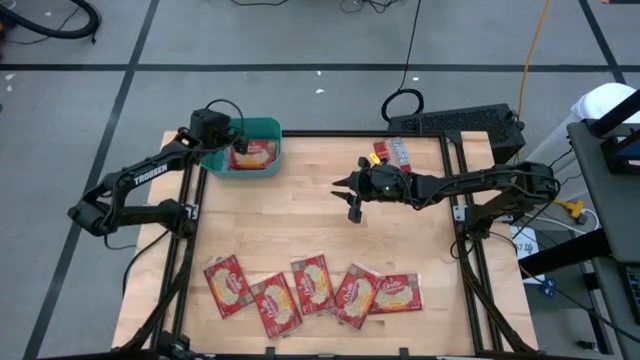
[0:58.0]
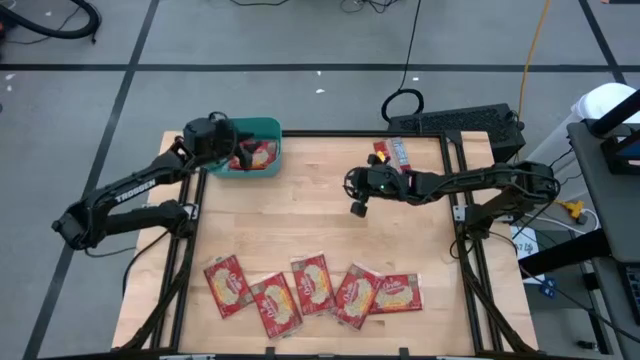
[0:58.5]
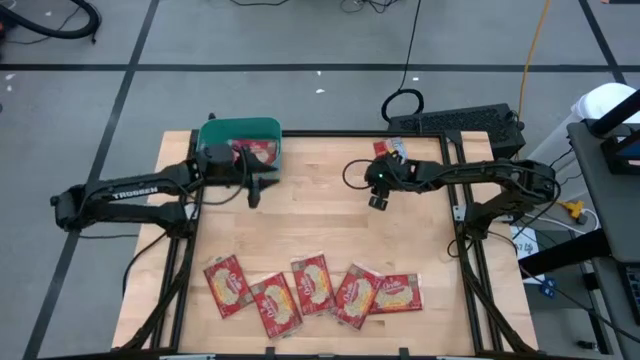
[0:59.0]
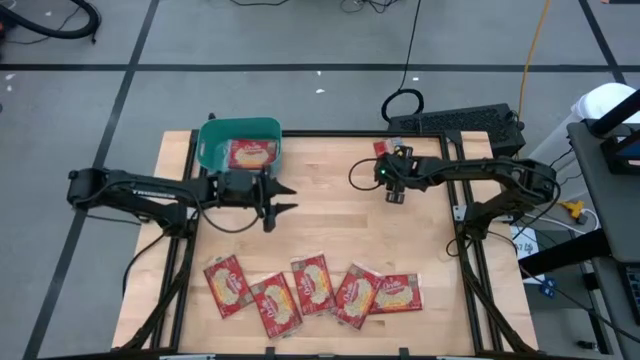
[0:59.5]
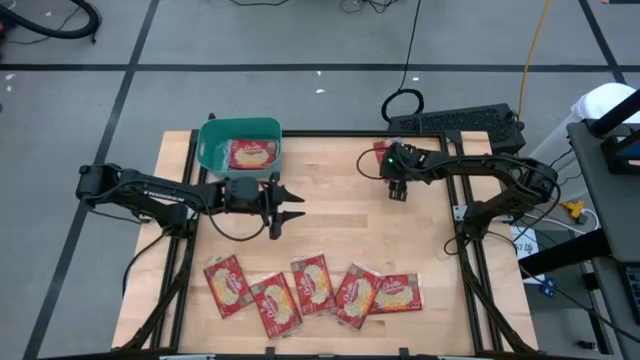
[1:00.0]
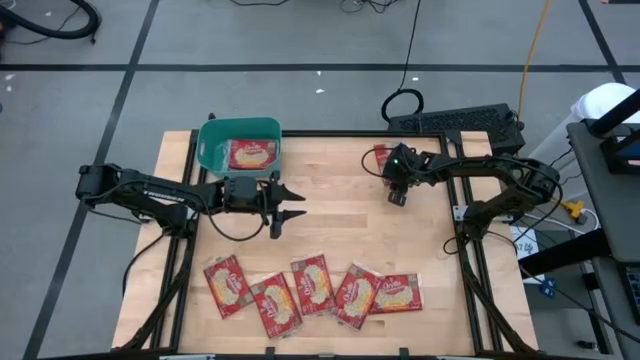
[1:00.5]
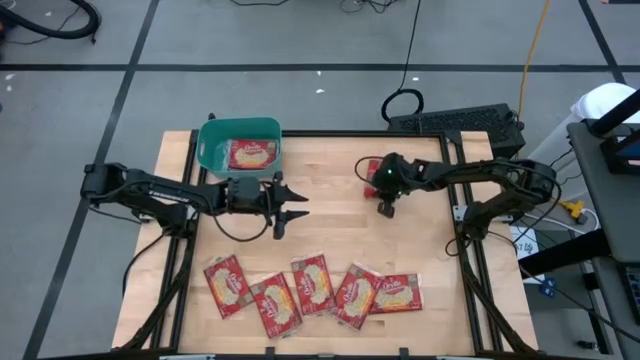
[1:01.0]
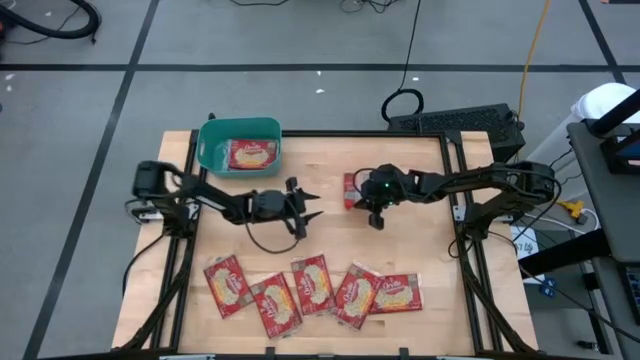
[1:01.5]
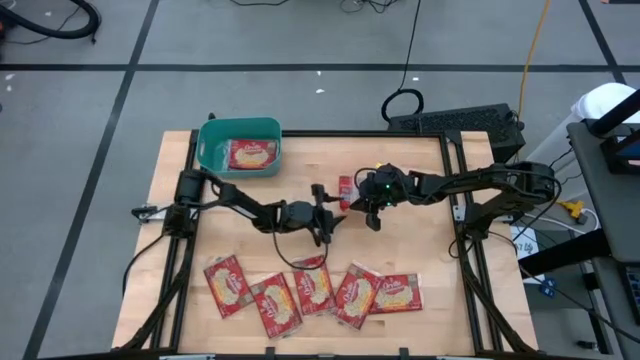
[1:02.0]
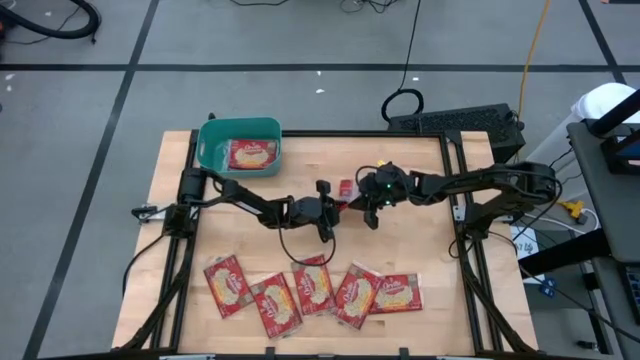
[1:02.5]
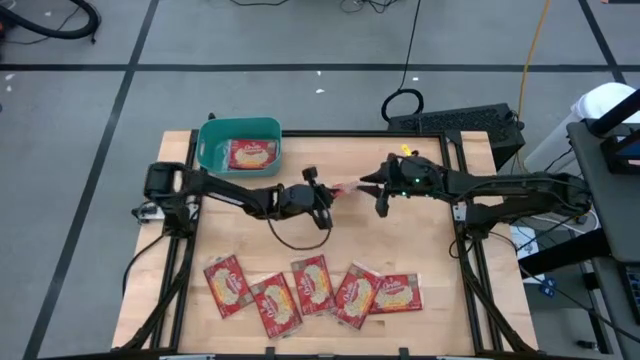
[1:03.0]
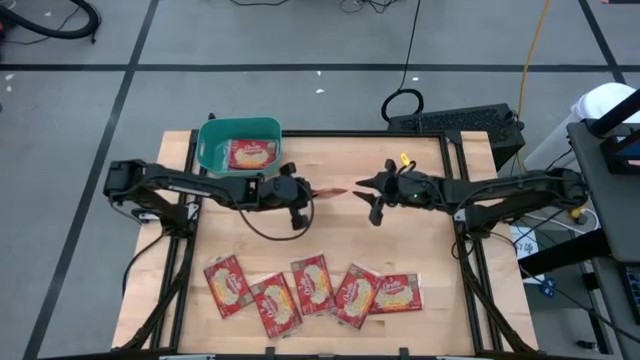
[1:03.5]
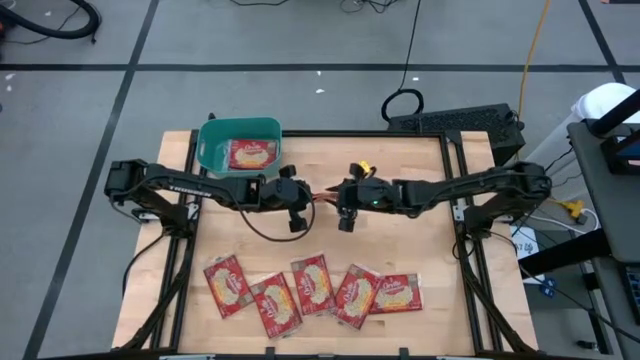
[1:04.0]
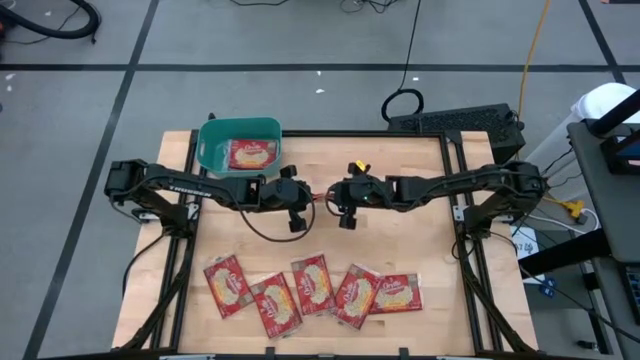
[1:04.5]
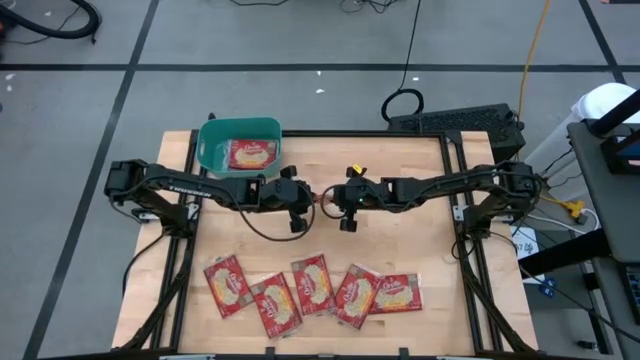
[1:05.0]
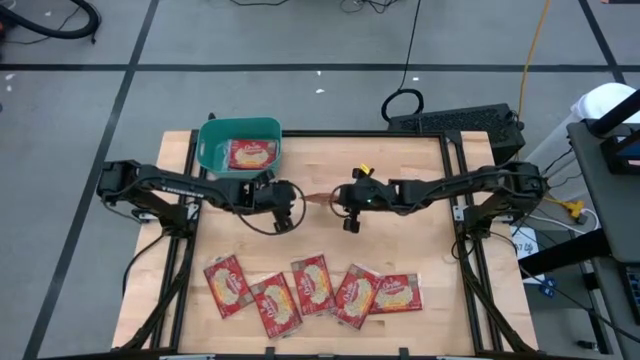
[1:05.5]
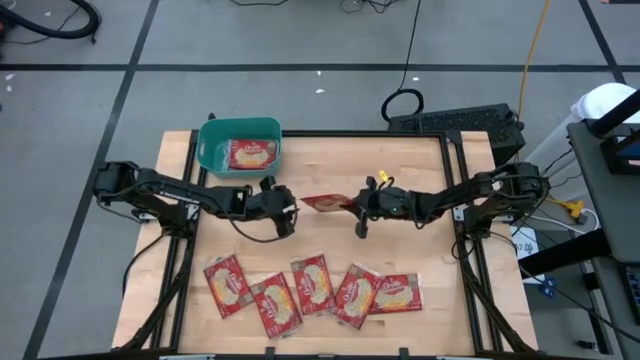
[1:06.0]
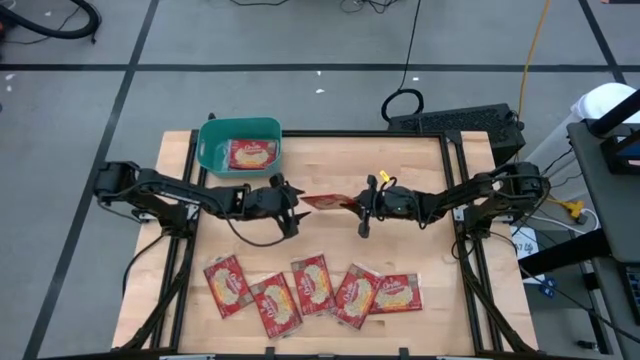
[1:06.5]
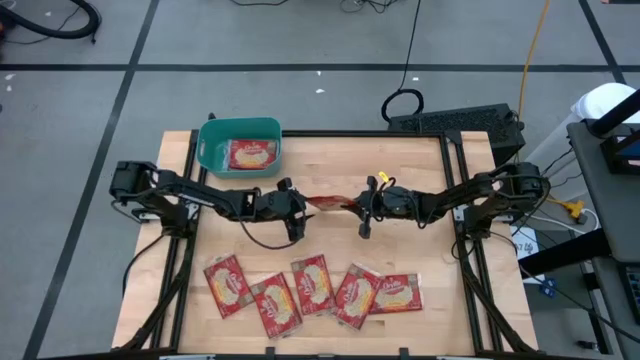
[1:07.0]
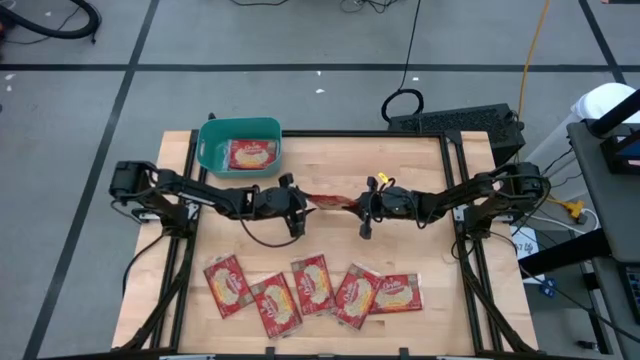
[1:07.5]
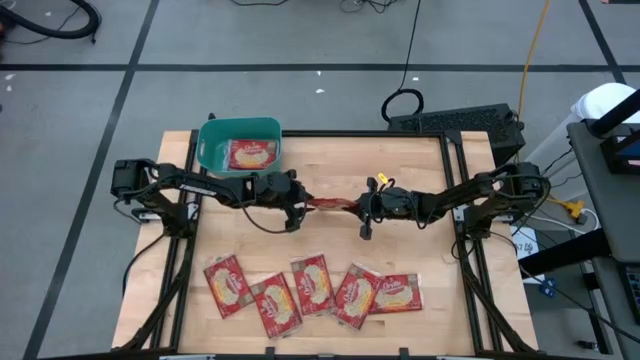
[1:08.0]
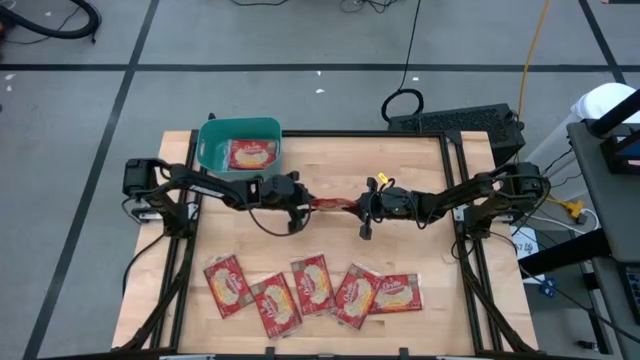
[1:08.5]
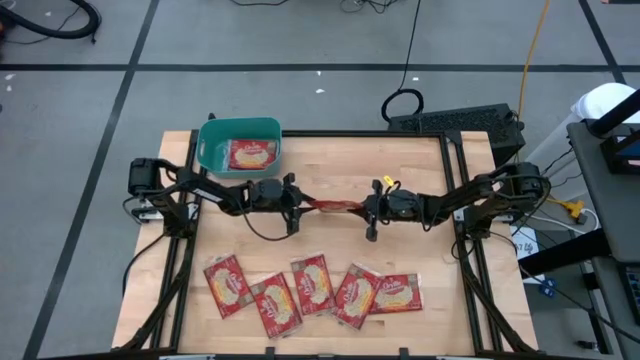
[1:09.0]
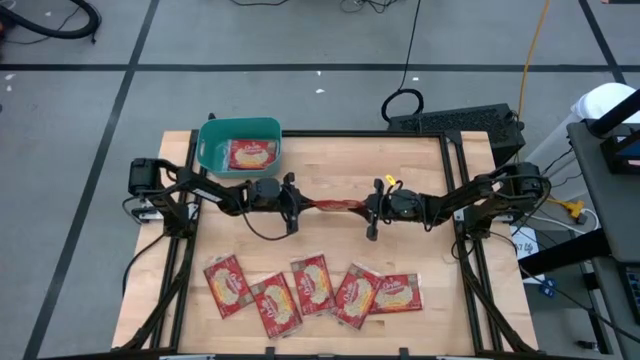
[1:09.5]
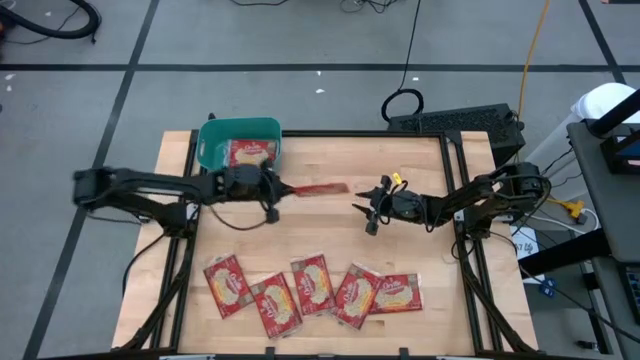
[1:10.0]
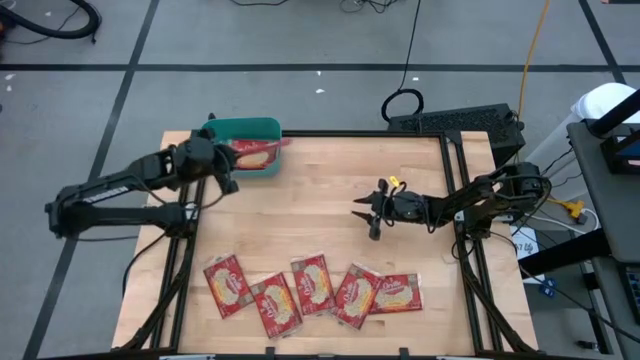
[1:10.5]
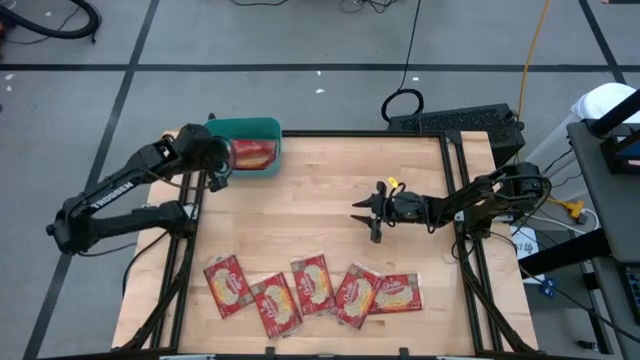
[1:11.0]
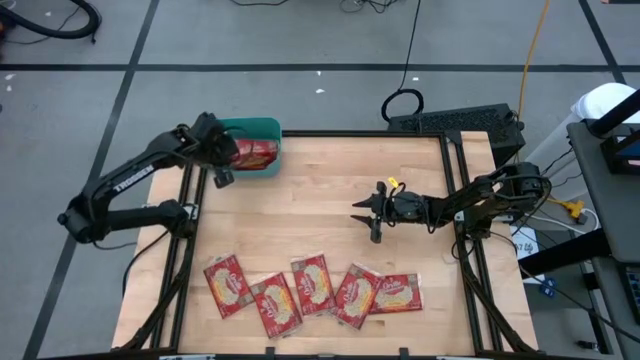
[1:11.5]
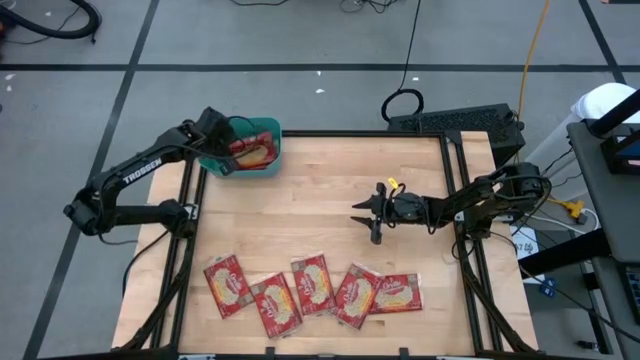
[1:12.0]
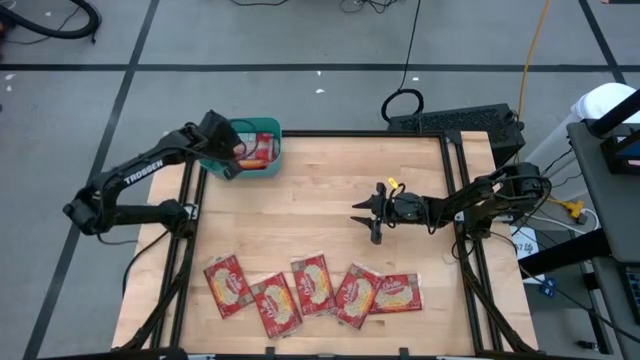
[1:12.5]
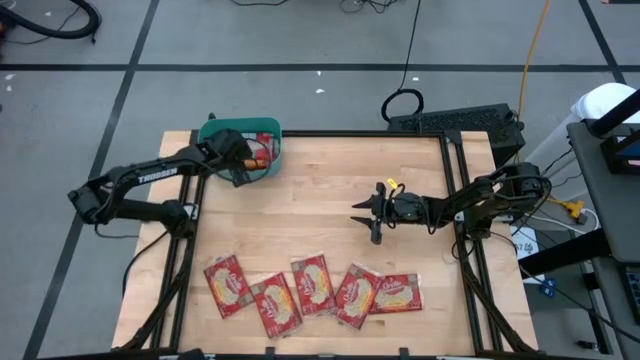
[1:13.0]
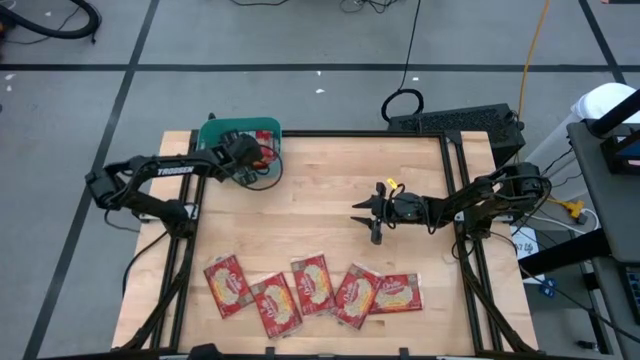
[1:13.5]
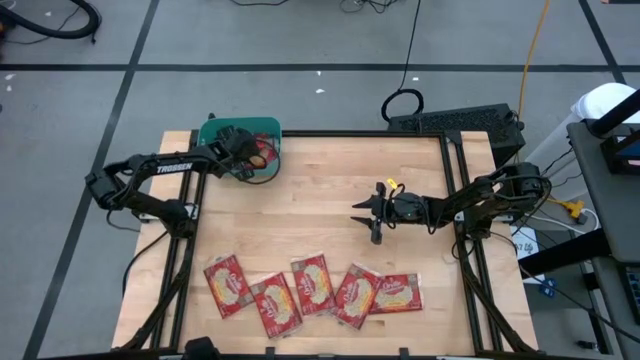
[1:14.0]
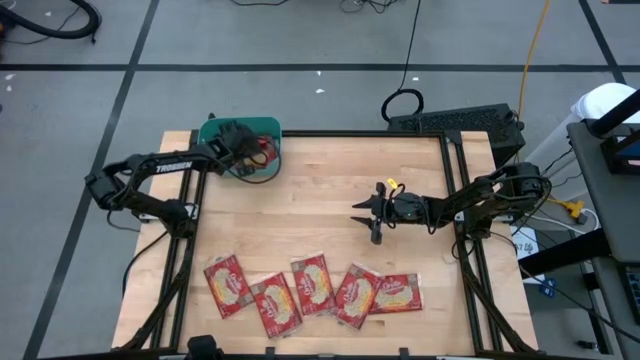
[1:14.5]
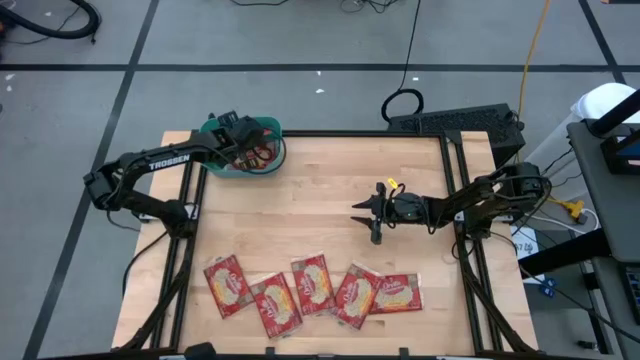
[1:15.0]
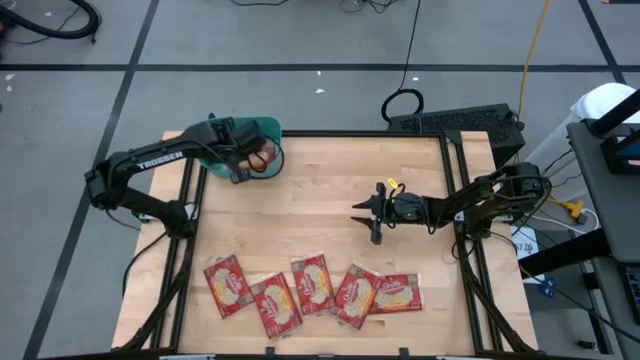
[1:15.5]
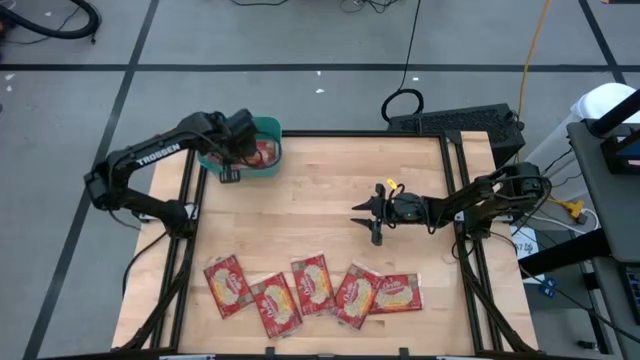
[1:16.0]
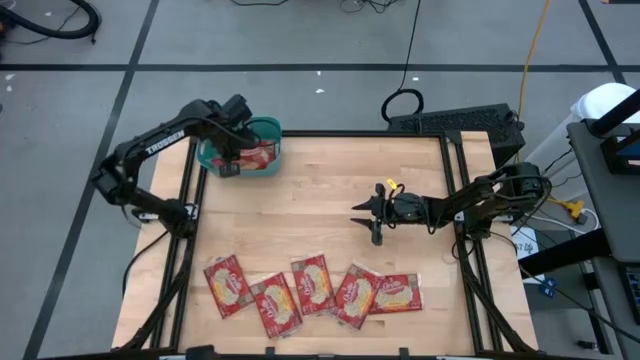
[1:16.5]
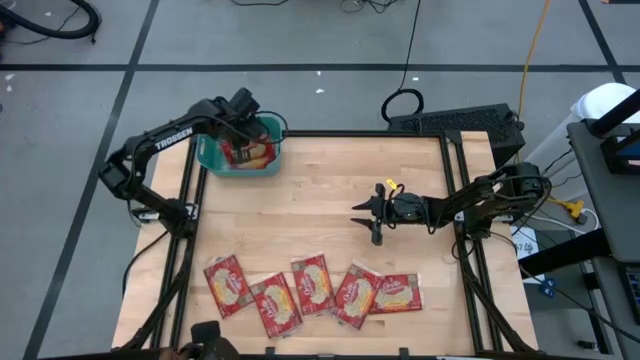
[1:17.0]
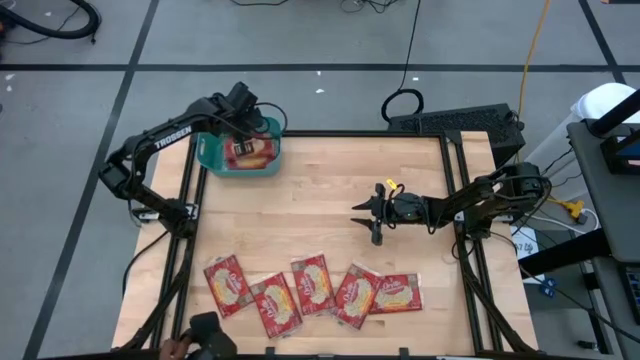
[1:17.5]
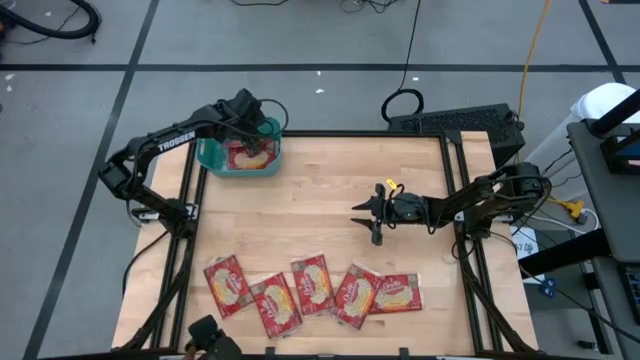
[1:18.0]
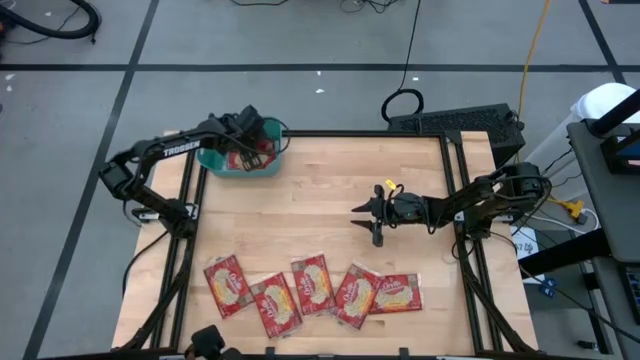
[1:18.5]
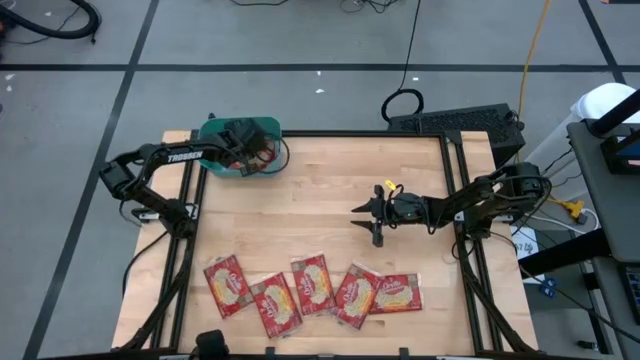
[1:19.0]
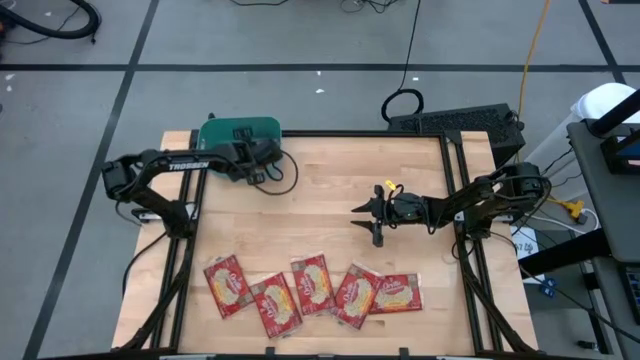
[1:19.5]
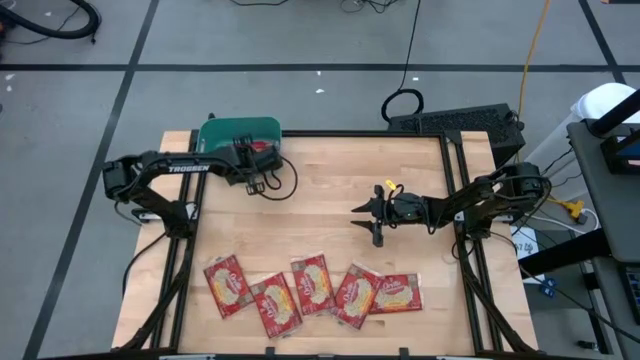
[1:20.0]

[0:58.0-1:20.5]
Task: Sort popcorn bags into baskets
Put the red popcorn bag into the green bin
